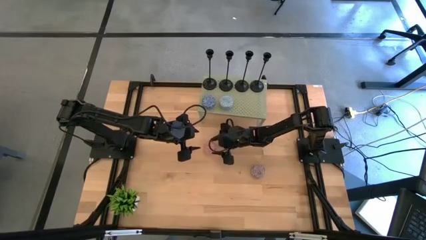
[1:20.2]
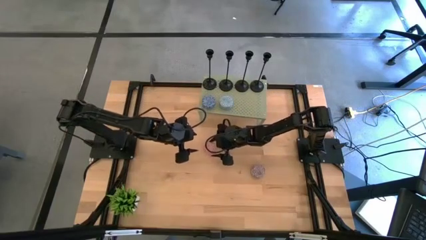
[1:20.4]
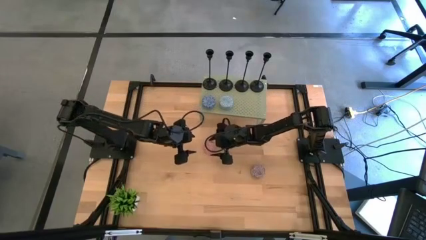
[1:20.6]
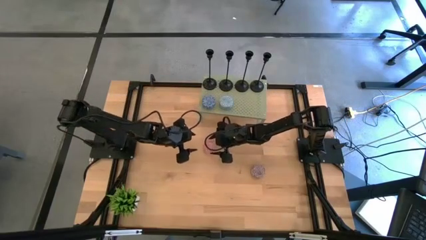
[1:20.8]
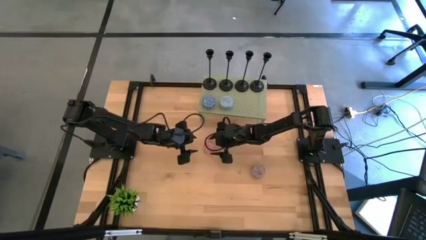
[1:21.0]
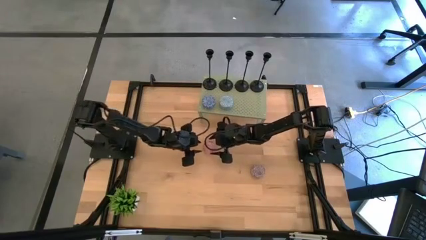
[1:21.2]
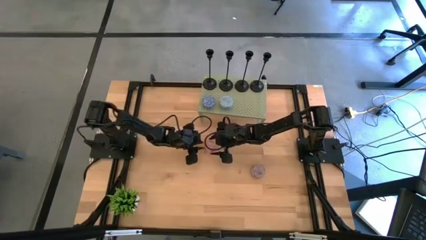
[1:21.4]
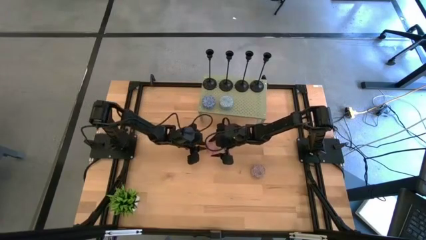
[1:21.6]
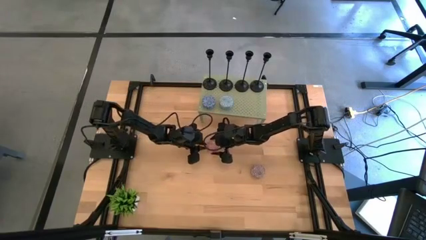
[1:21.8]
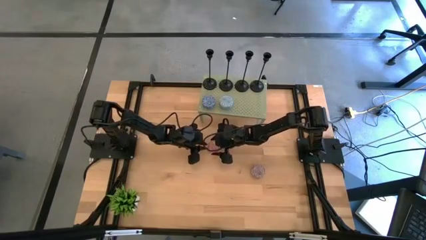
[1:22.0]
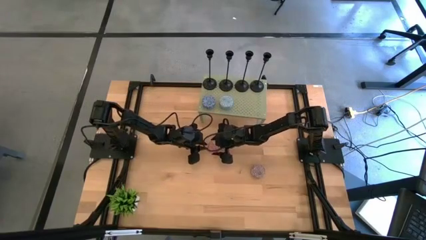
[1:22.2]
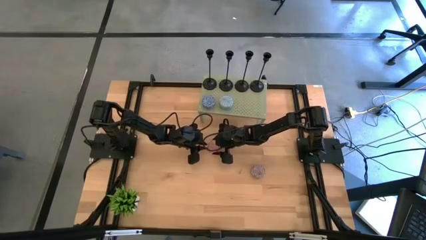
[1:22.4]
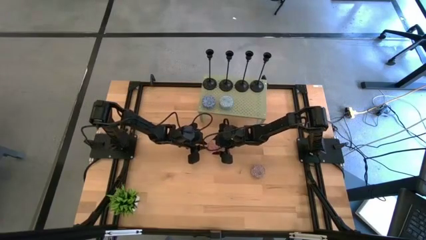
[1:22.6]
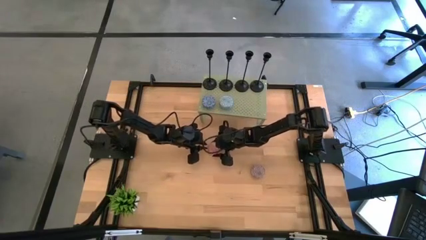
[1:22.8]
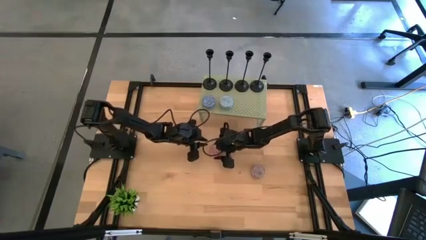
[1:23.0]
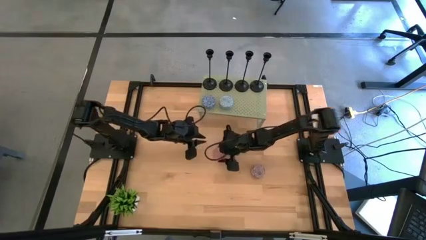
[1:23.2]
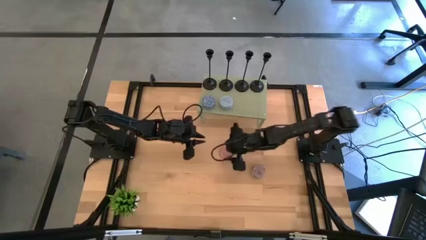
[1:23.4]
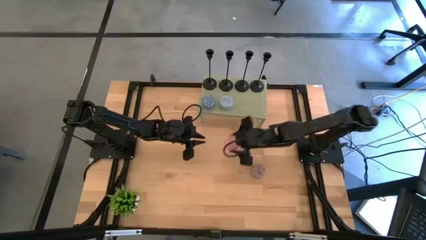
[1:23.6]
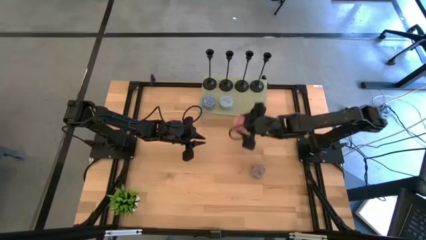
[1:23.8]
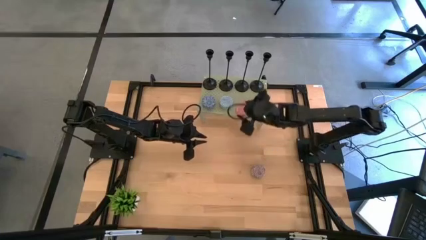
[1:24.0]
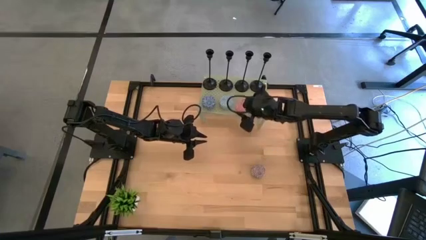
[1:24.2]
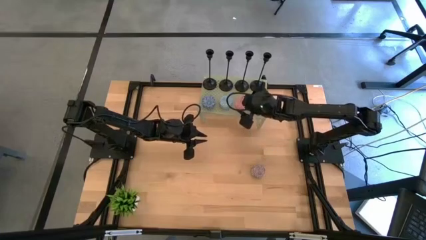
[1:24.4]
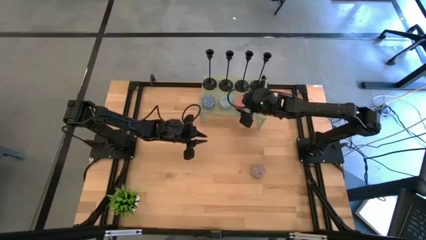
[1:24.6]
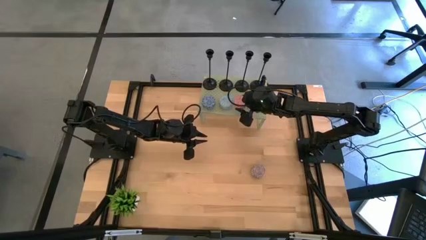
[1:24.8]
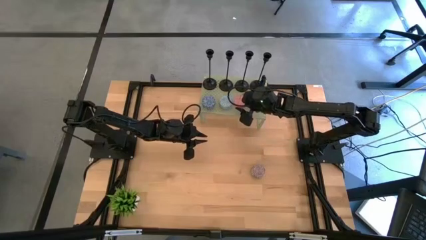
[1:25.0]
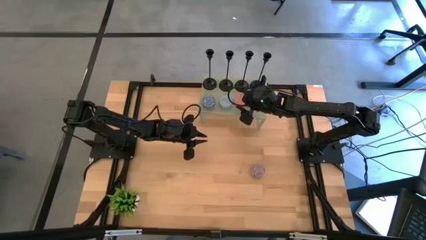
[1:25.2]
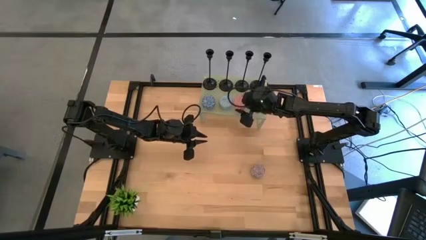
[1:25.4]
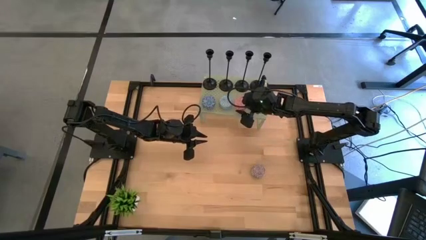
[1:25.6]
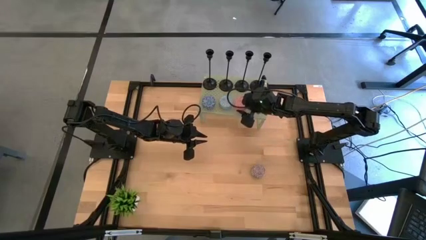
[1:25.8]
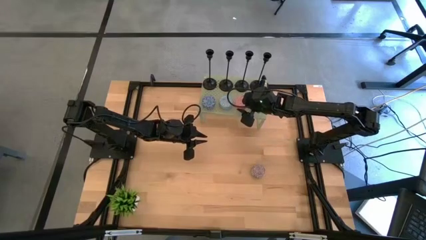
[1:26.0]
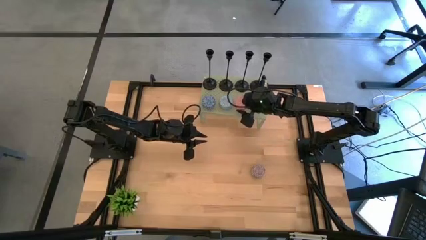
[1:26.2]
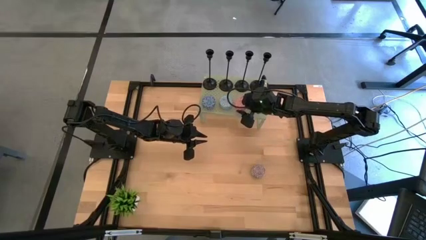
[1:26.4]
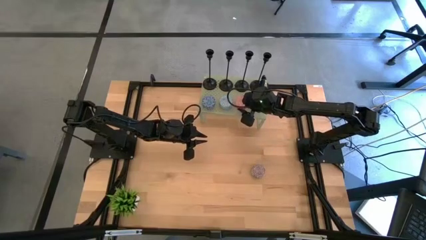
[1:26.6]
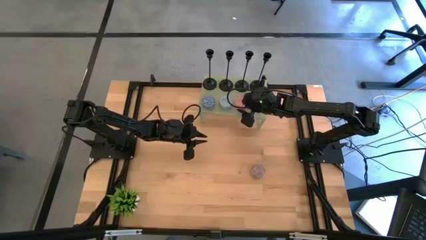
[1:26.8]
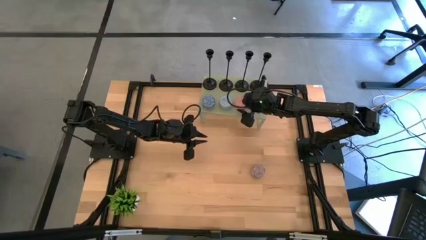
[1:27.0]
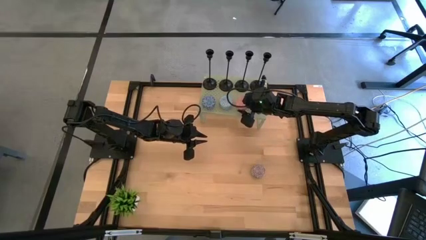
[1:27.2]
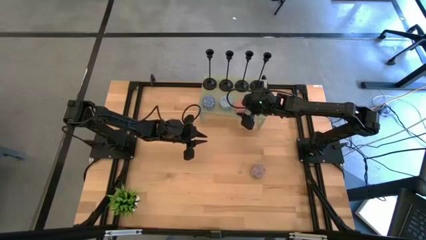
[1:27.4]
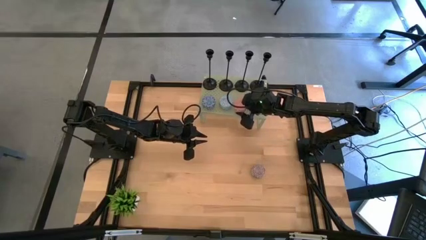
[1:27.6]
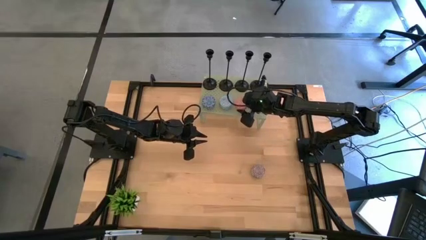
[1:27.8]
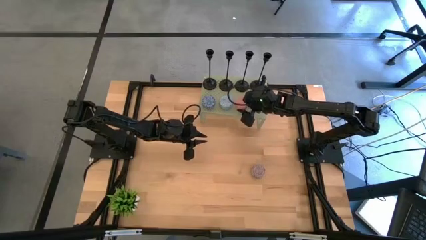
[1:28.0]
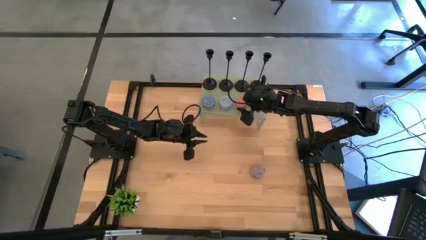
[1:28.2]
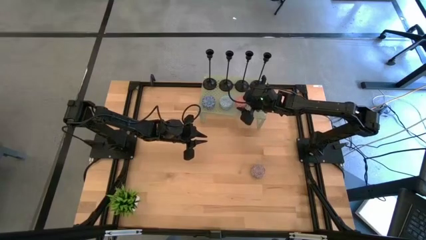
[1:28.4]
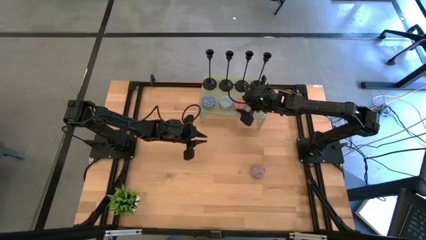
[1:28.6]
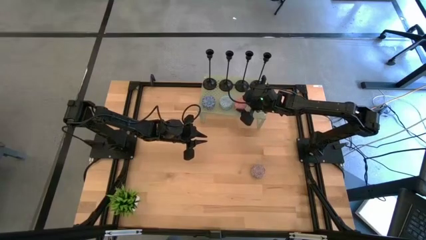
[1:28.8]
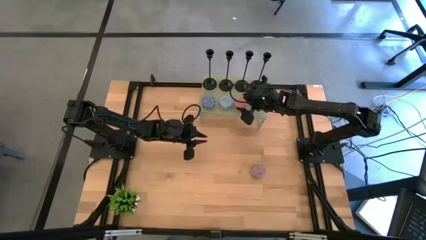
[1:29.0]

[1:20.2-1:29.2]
Task: Pick & Place candle stick holders
Put the pink scented candle on the shelf

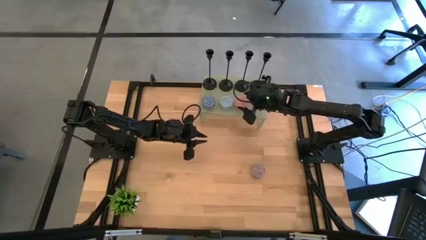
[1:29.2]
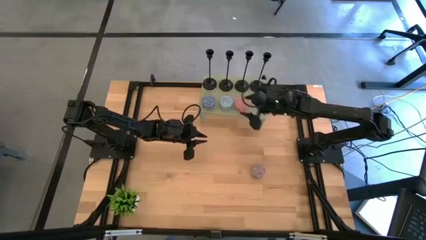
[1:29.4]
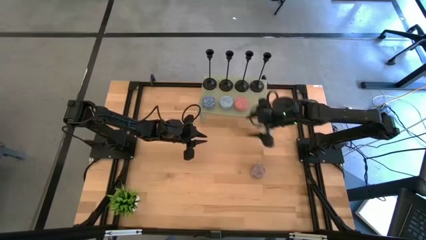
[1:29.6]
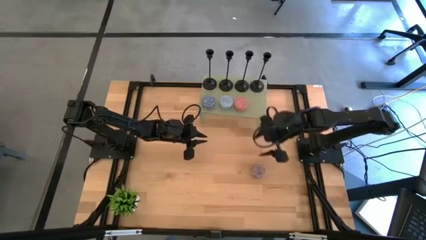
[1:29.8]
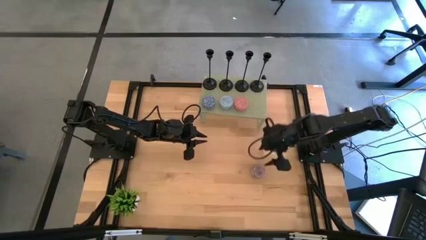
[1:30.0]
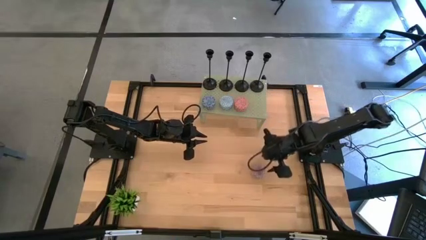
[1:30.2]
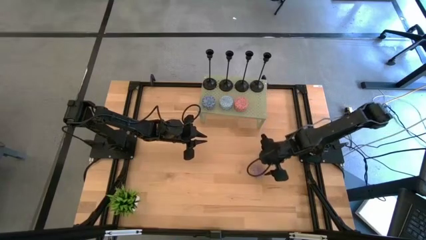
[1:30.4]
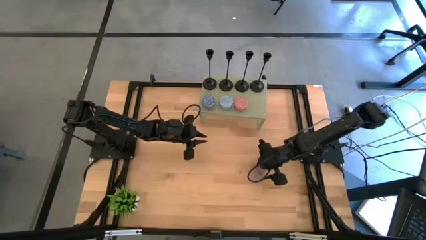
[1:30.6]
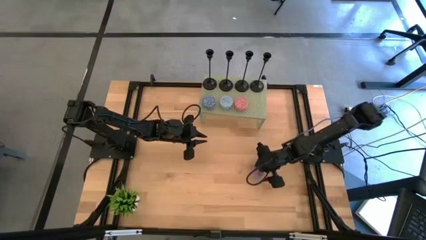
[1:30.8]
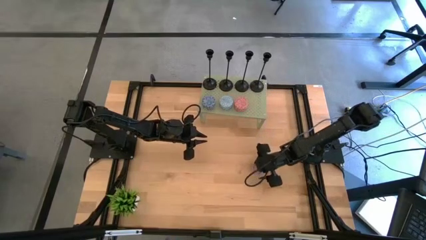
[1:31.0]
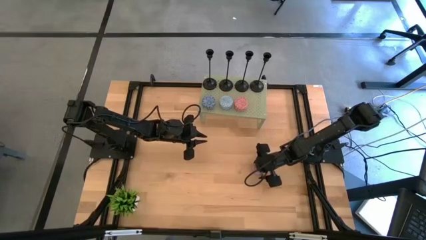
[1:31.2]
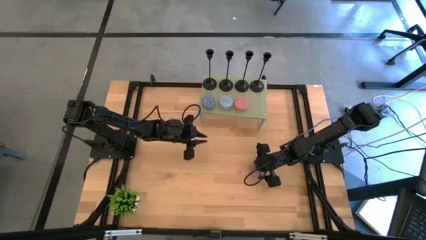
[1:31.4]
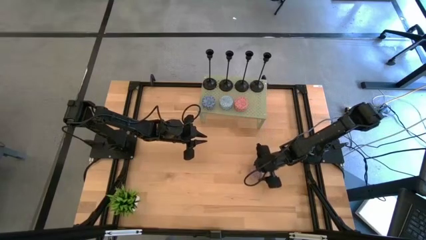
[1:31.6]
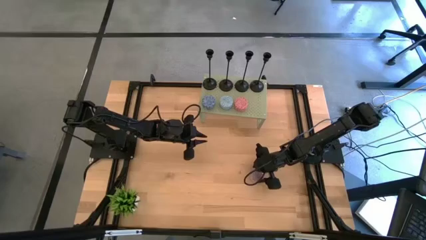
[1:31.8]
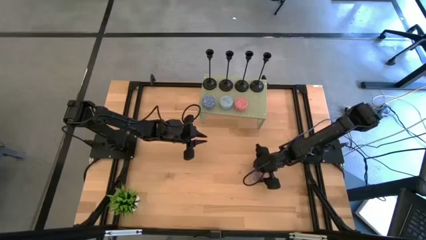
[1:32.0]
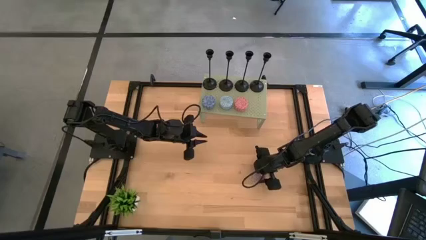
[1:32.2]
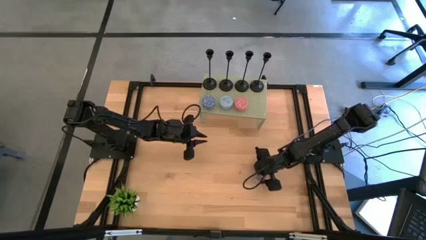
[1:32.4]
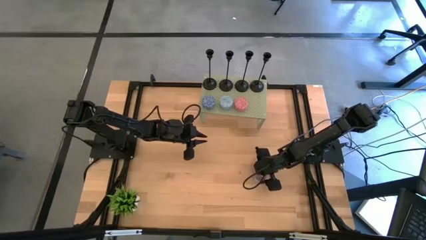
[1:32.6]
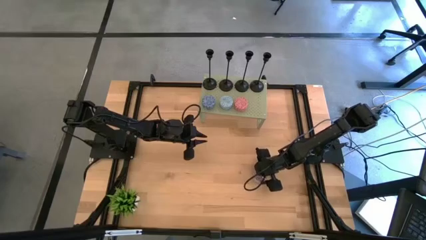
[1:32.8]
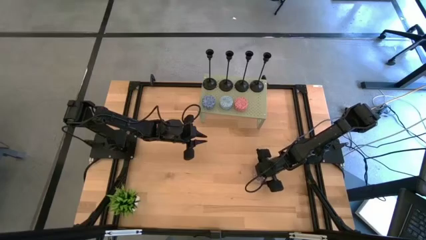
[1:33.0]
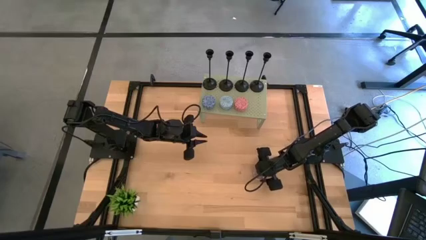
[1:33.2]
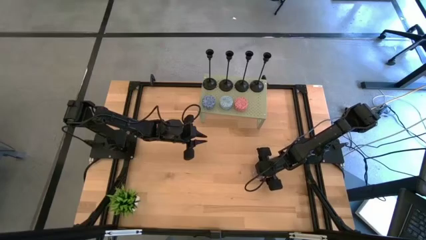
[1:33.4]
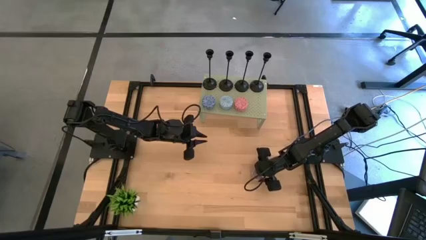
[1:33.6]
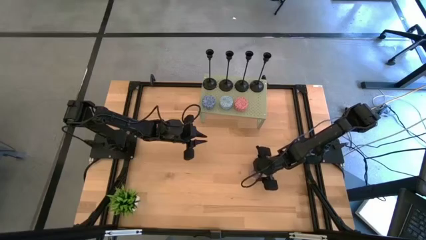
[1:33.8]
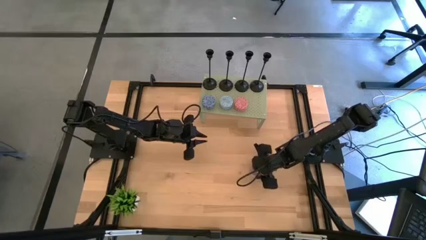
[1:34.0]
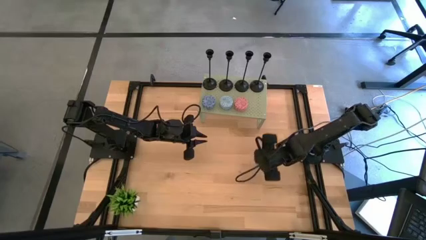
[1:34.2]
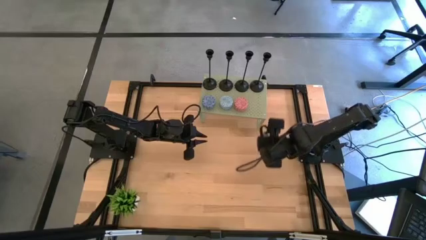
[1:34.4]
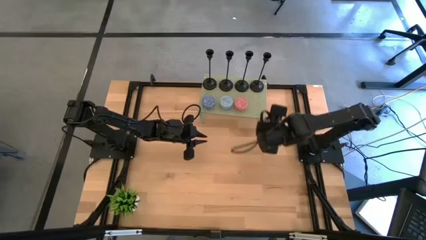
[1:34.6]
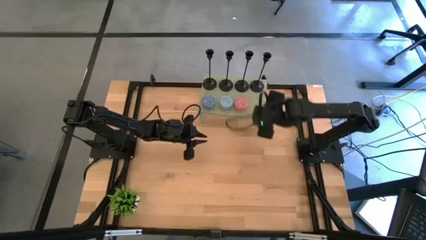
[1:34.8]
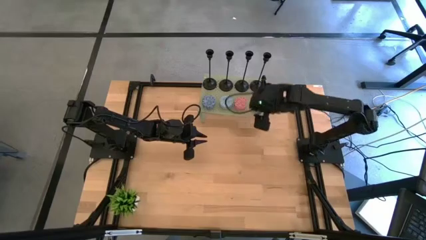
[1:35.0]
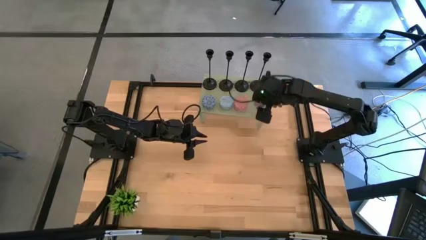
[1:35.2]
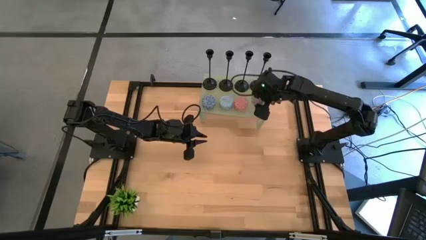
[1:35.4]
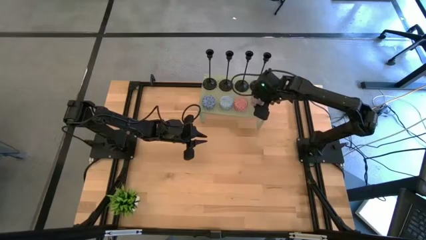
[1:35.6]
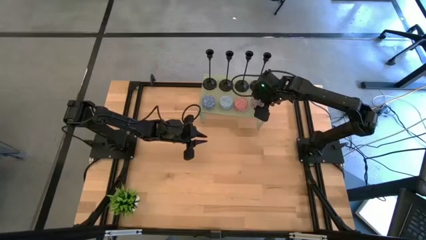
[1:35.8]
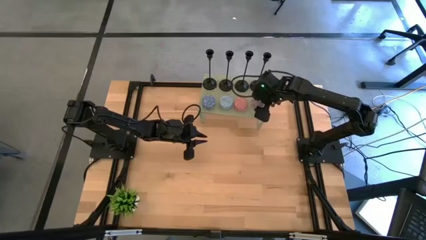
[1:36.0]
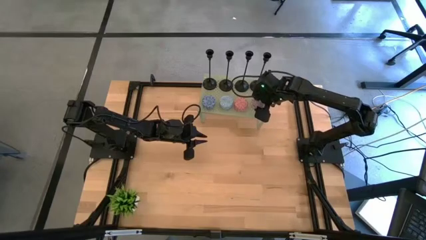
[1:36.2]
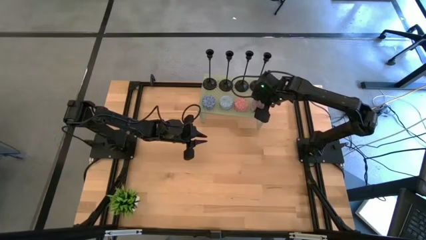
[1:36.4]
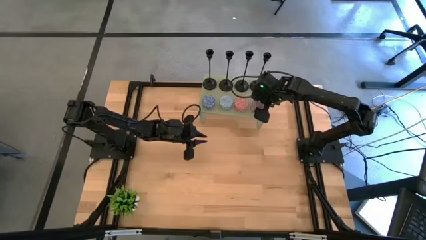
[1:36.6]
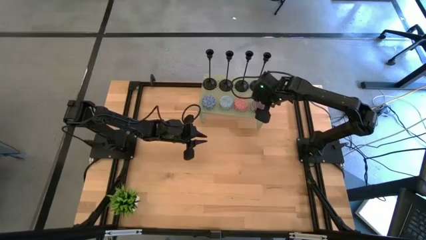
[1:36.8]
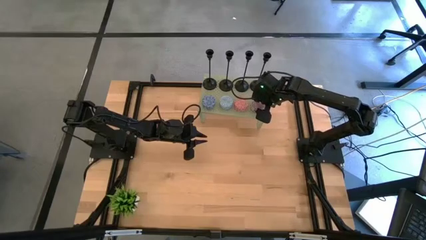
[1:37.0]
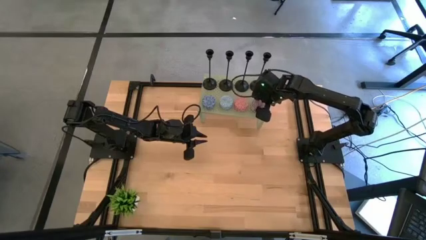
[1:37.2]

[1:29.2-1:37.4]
Put the purple scented candle on the shelf
